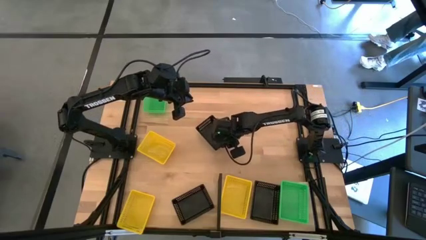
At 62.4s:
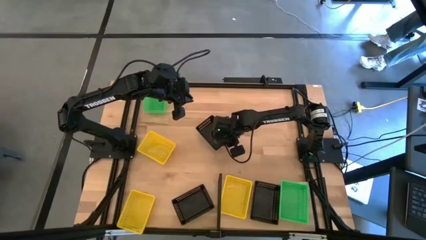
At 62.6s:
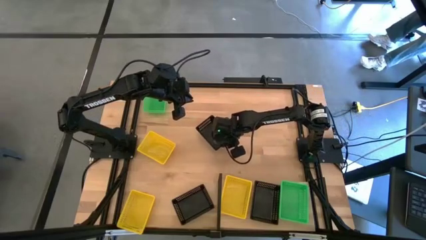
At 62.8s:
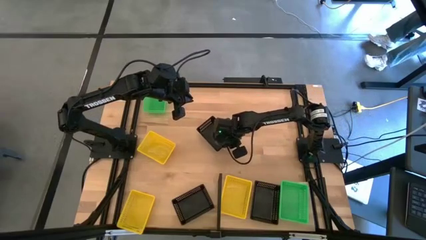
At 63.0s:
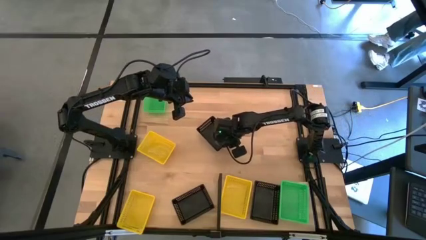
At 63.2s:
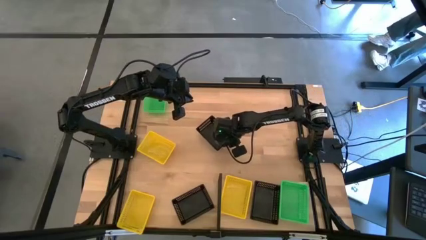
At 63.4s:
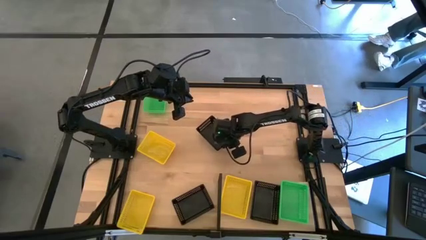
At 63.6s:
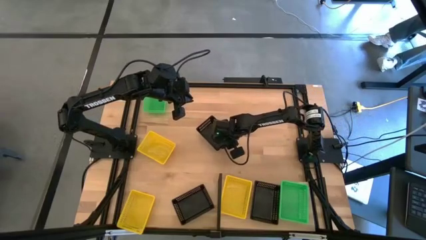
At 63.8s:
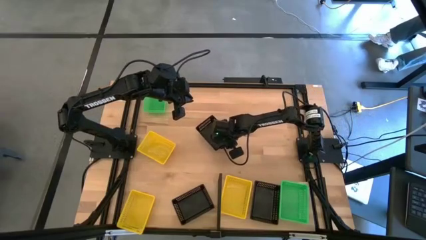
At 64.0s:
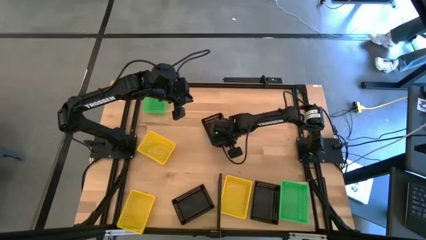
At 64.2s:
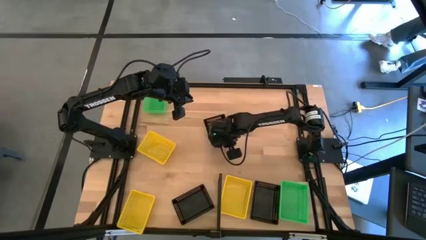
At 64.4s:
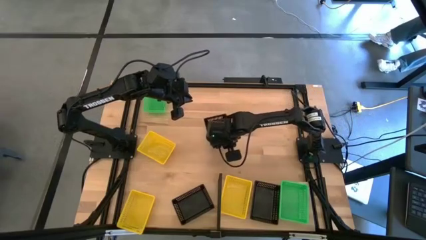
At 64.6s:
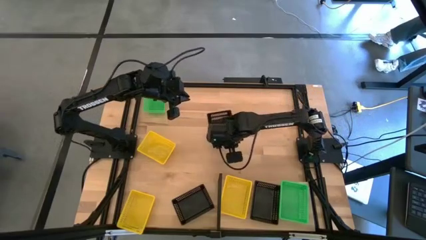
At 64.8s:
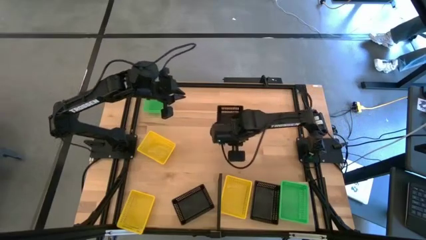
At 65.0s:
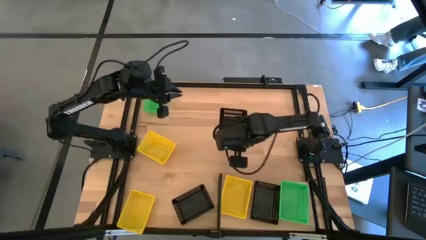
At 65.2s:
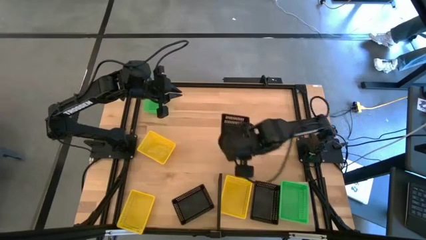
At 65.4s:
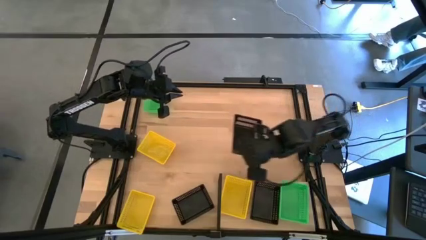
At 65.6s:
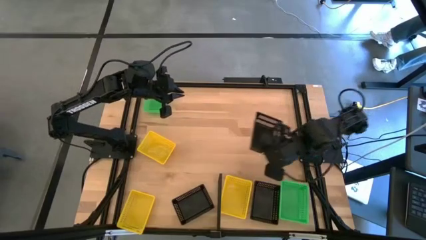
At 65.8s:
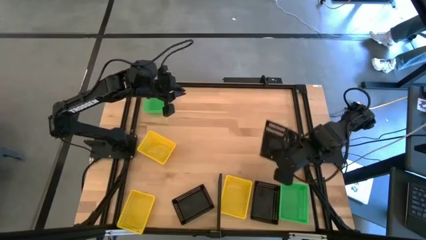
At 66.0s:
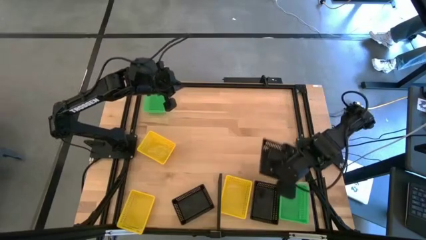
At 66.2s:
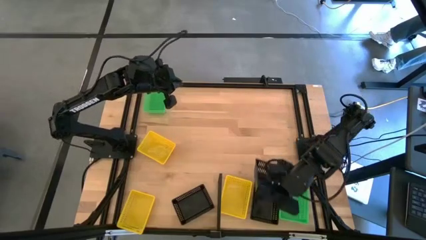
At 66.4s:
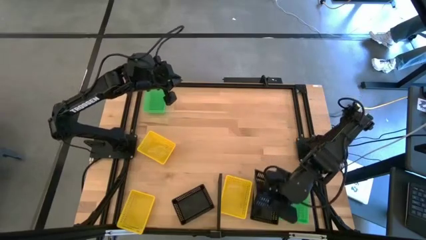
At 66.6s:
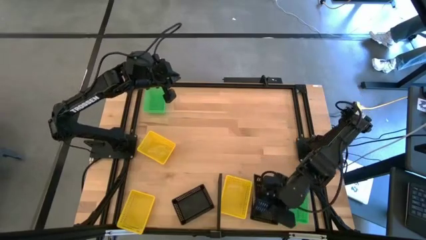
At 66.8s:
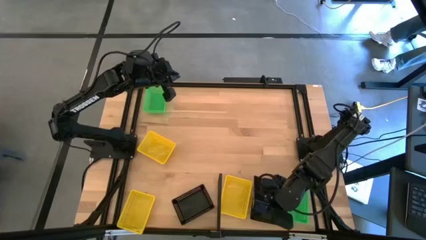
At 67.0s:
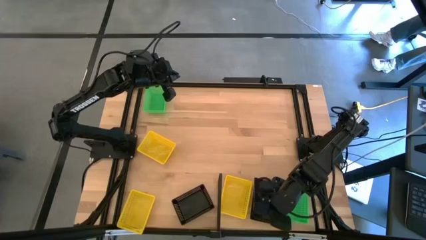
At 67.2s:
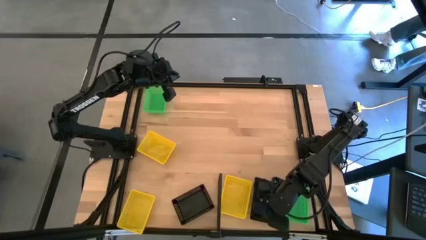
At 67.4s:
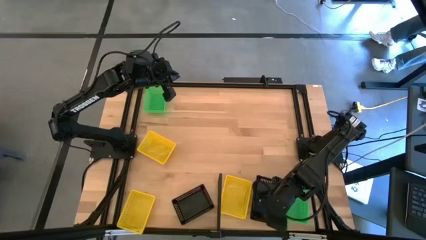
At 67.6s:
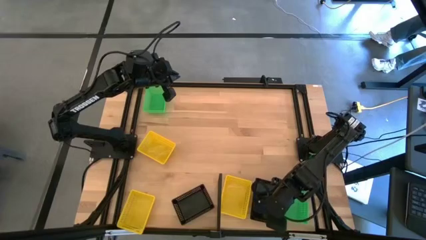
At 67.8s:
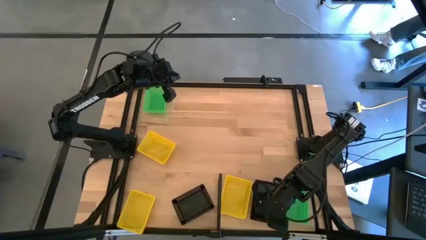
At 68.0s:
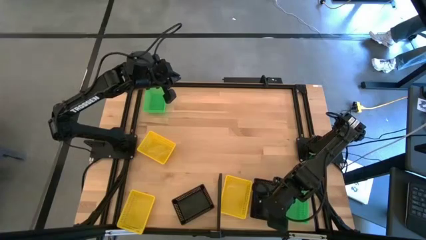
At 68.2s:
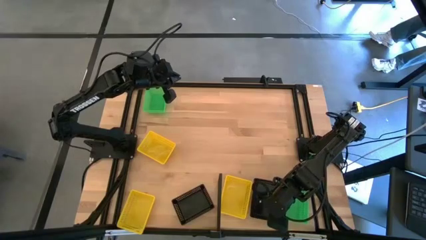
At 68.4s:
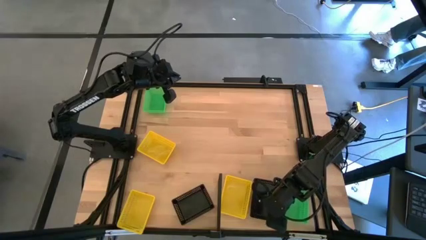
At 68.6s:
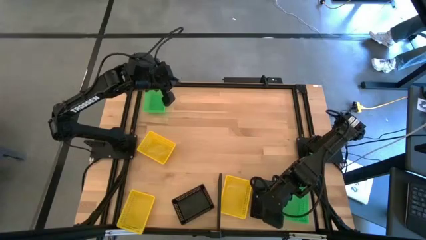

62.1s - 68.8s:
Task: Stack baskets on shelf by color
Stack the top black bin on top of the black bin on the shelf

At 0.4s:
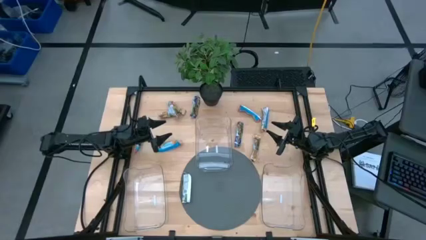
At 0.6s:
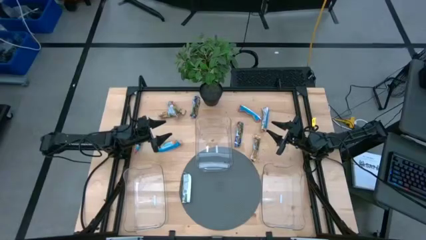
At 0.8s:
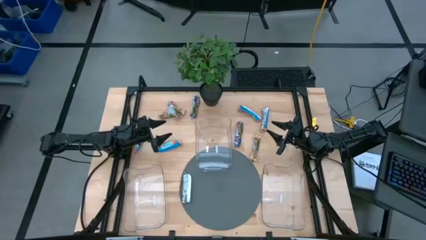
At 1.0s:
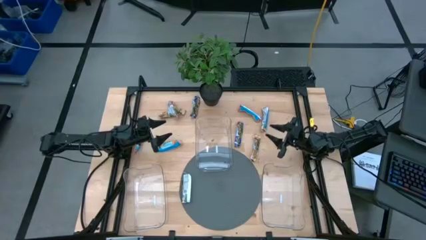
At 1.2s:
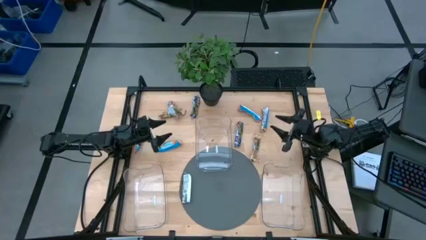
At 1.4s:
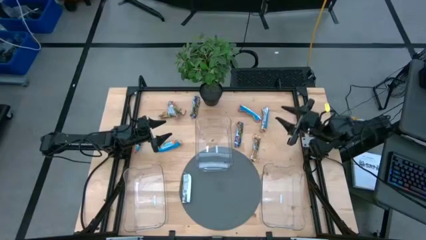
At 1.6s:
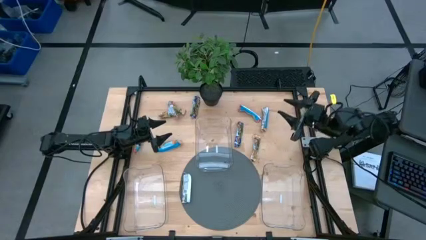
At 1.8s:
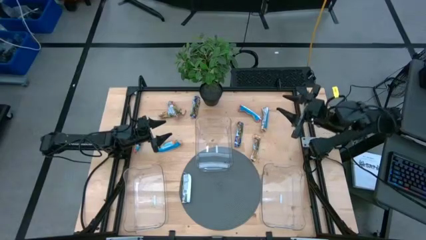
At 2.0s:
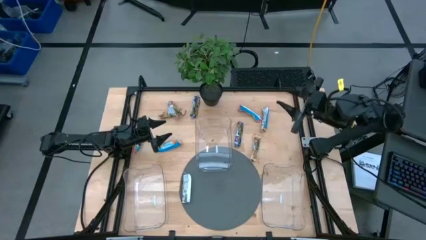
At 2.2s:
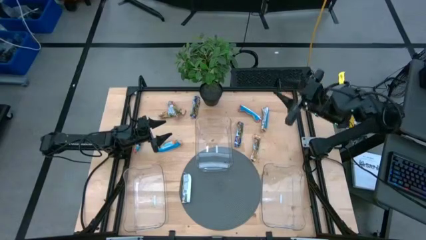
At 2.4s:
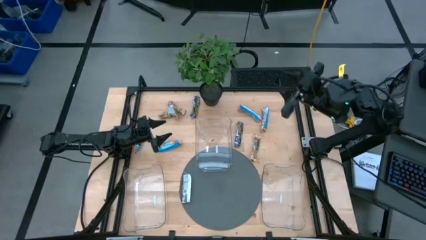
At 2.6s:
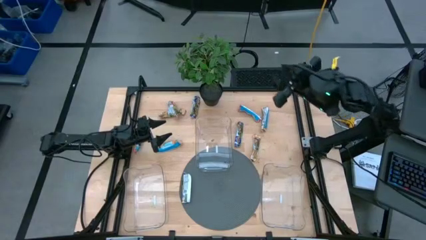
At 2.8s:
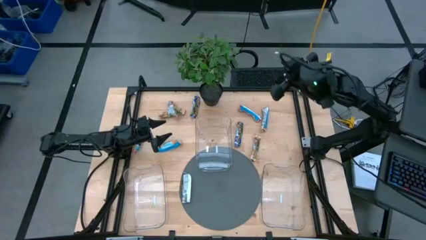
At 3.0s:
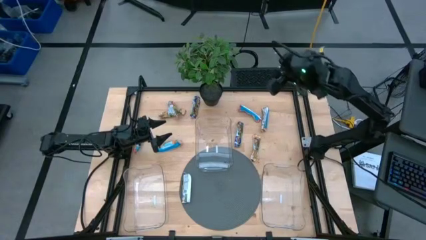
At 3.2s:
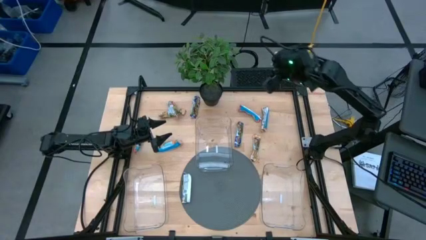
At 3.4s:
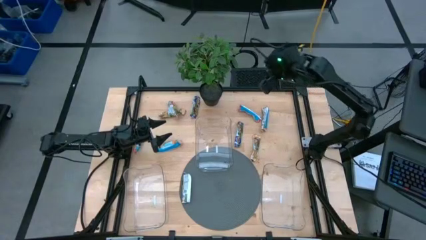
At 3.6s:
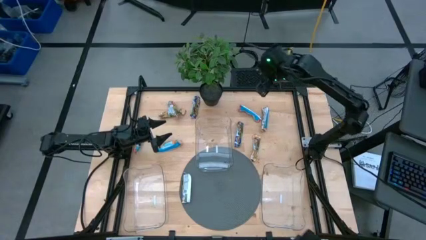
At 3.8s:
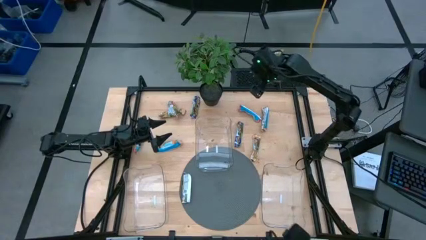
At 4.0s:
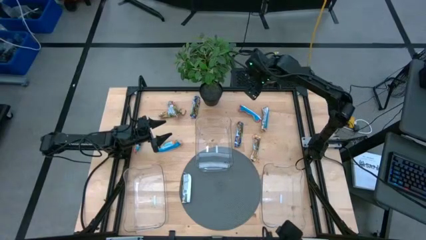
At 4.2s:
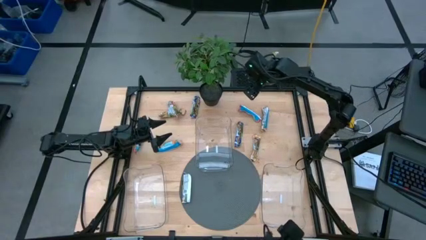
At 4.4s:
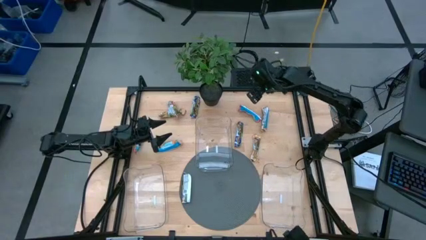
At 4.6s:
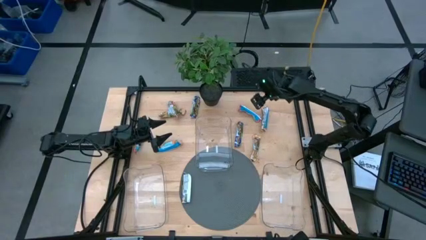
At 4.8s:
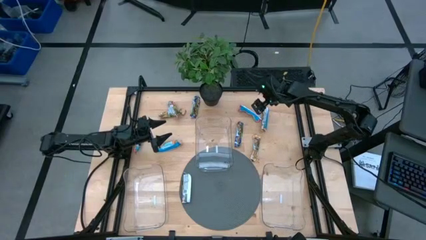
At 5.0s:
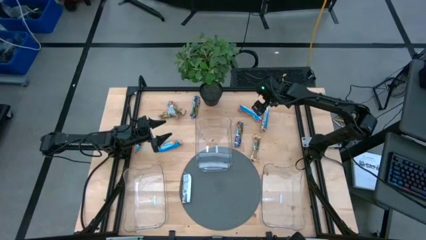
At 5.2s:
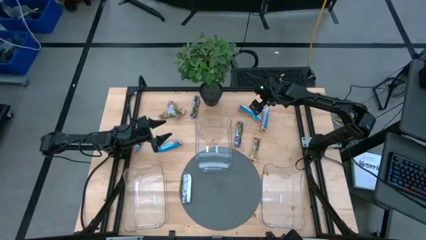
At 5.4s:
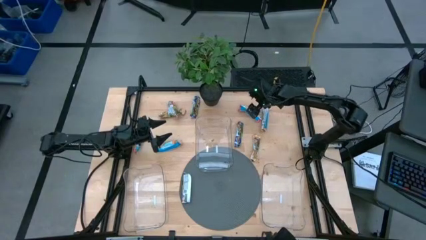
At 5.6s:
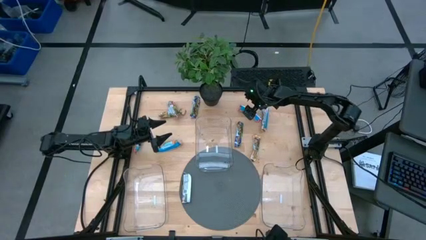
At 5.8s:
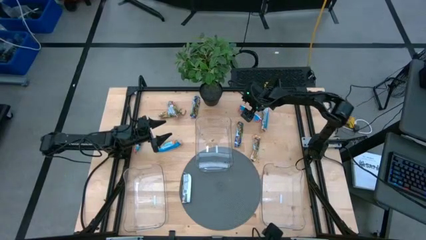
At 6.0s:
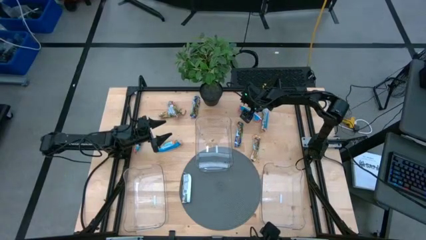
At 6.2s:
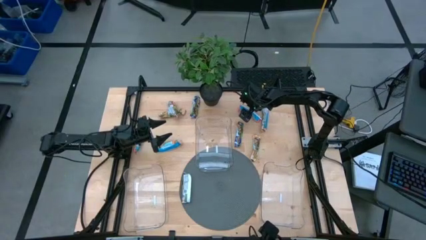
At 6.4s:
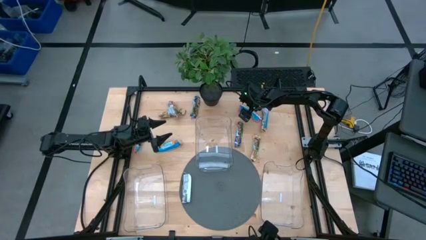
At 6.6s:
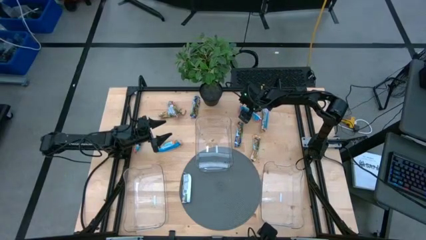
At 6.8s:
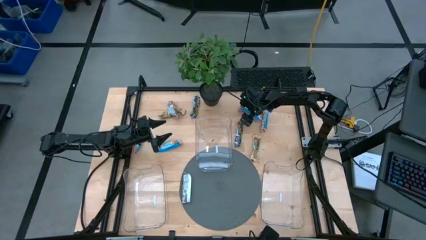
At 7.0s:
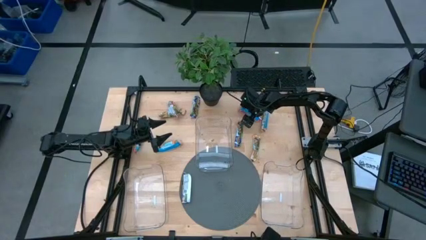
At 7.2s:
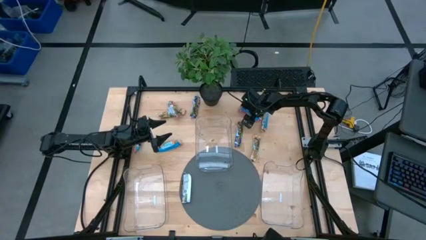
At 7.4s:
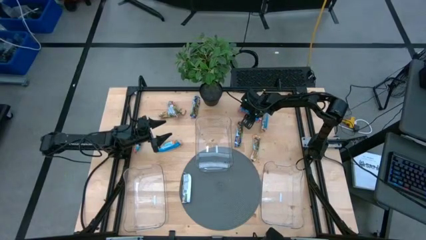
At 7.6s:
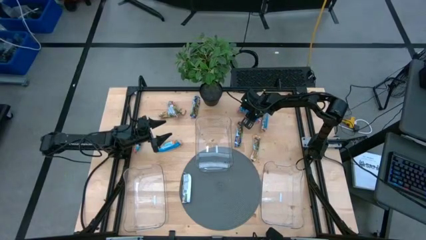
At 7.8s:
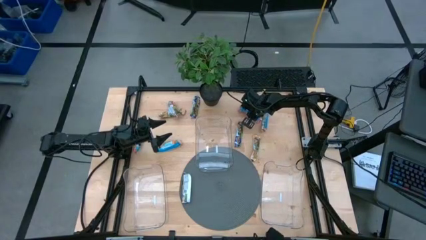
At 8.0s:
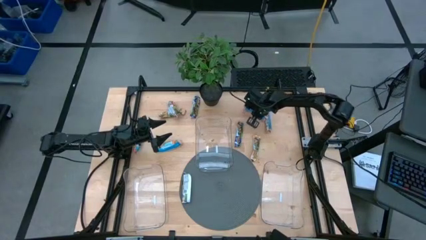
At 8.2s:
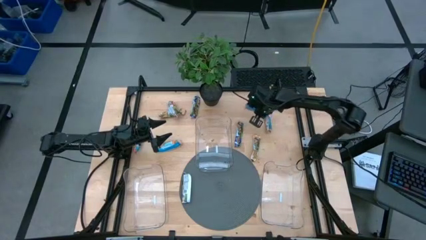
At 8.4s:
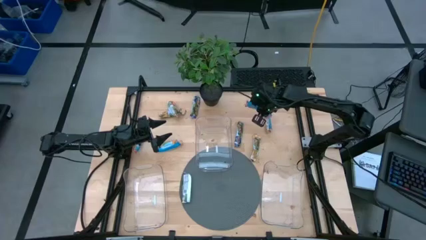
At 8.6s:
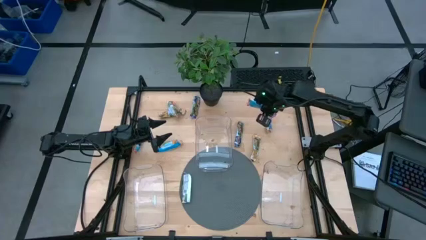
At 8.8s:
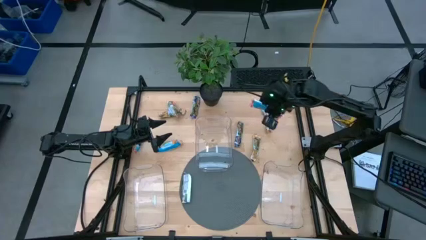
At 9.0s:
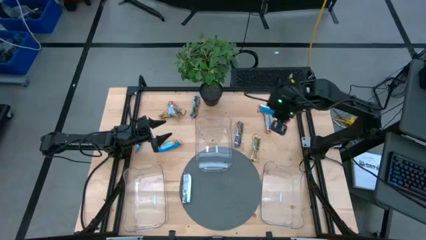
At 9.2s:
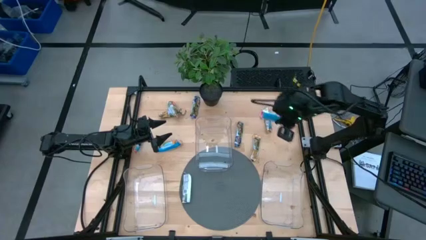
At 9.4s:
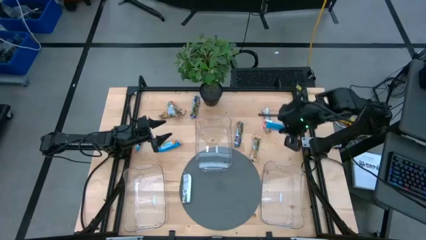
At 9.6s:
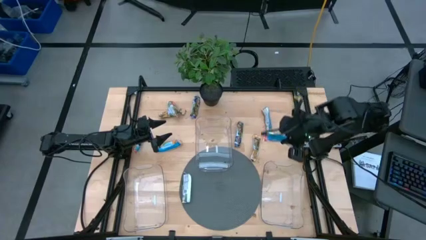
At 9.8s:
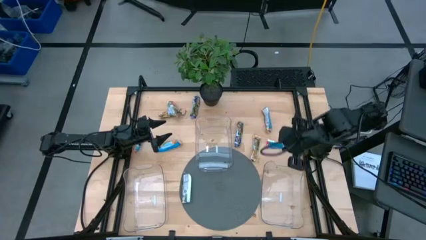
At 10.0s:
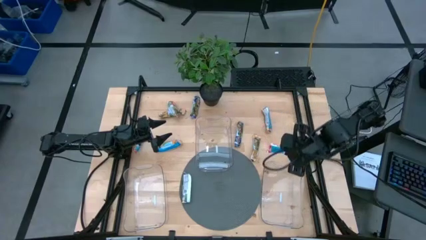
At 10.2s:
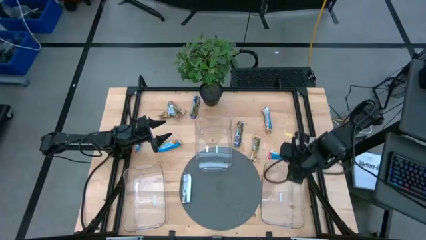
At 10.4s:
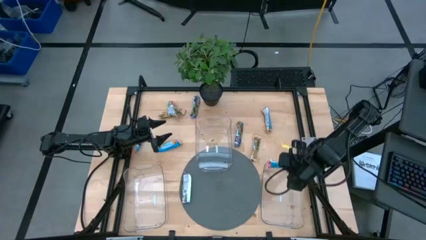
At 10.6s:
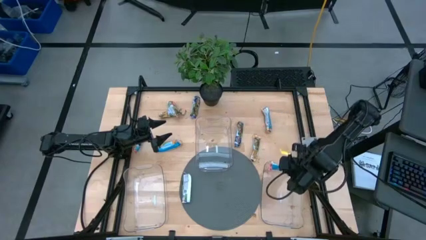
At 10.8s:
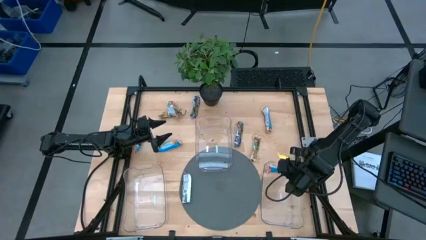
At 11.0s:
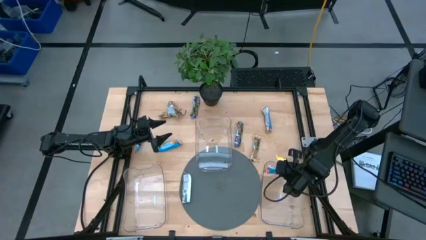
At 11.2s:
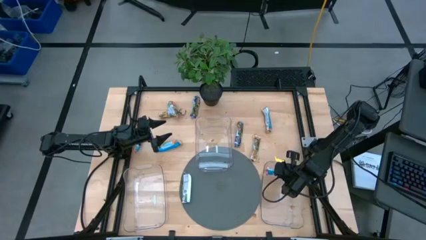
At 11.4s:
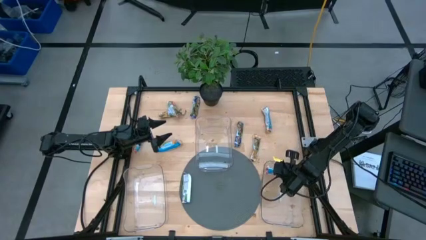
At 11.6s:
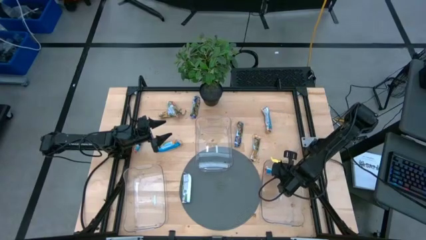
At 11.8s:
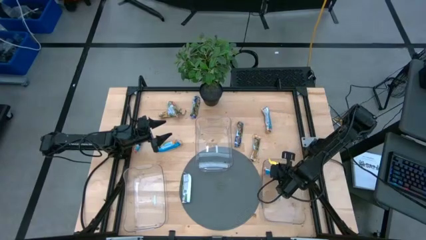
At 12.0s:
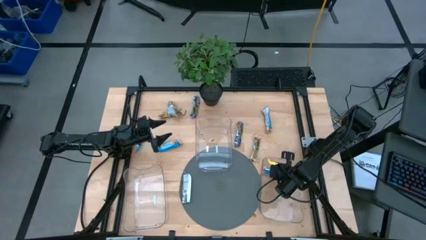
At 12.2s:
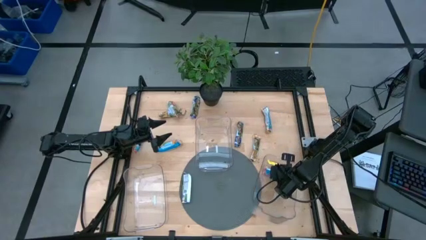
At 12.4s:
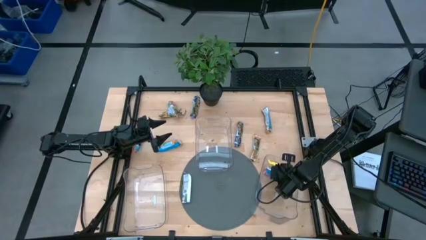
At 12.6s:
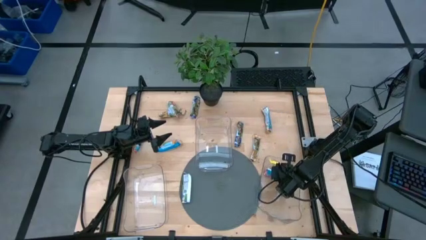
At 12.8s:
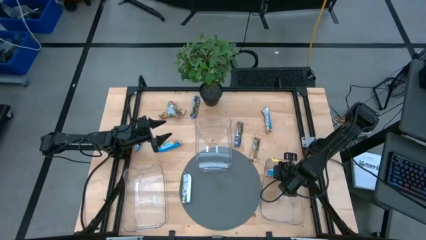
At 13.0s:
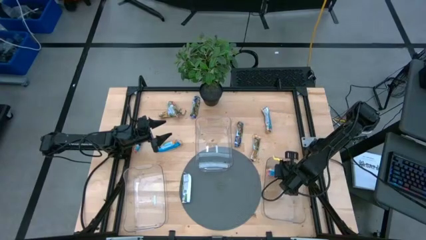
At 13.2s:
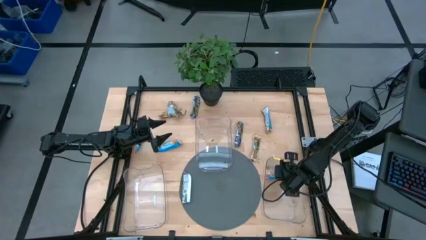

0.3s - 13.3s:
Task: Pick and place Granola Bars by type
Put the middle red granola bar into the right transparent bin
